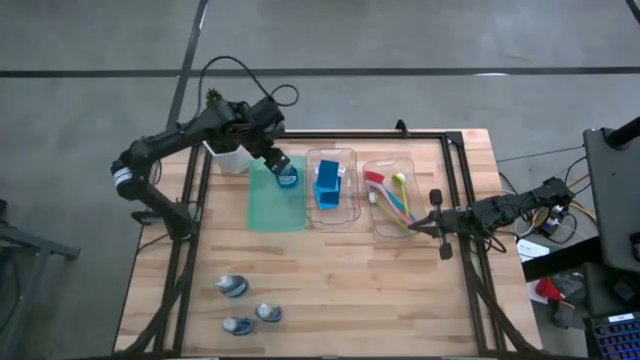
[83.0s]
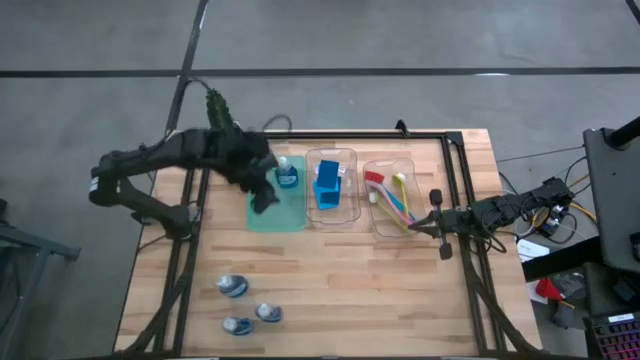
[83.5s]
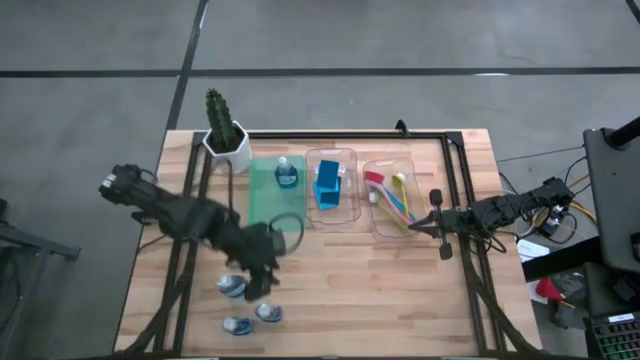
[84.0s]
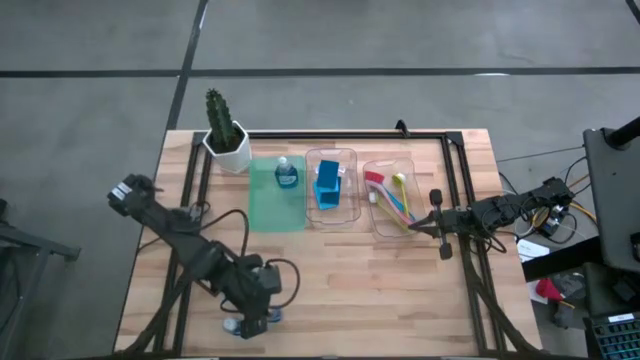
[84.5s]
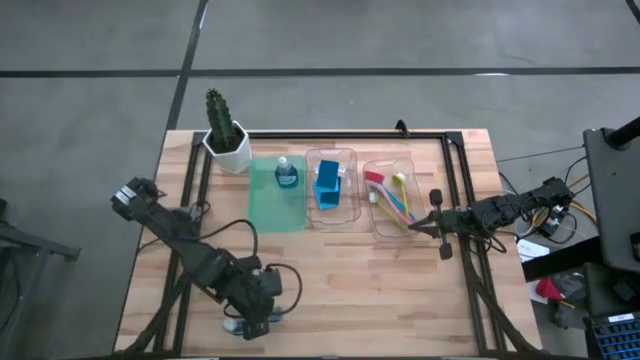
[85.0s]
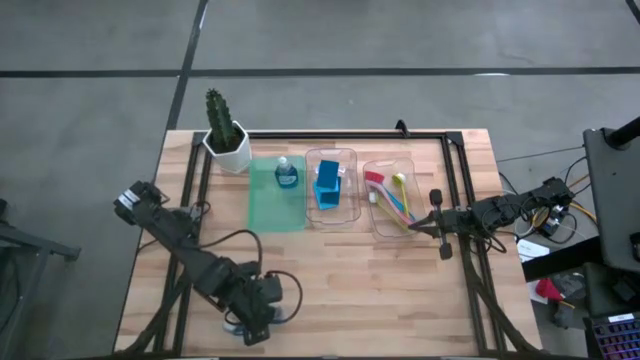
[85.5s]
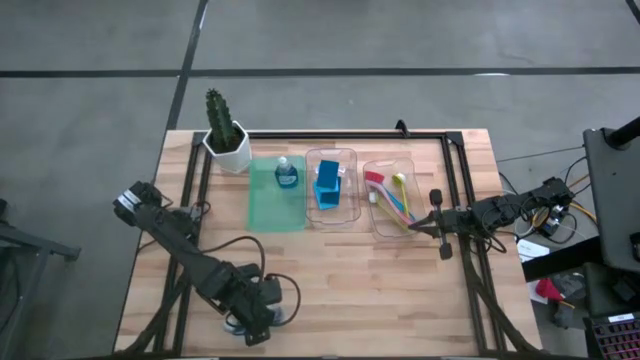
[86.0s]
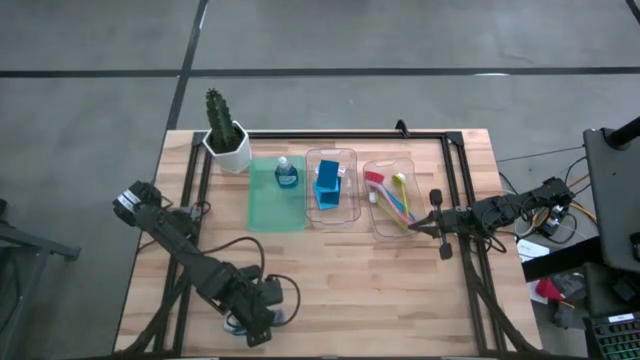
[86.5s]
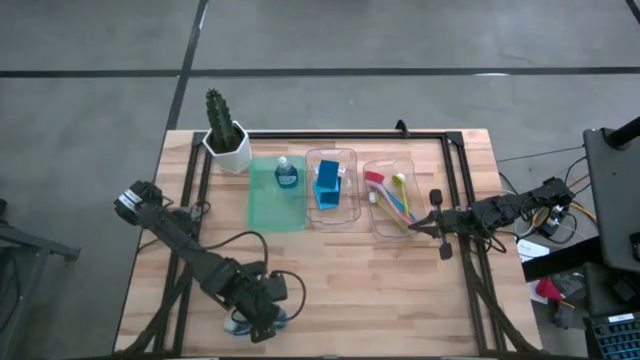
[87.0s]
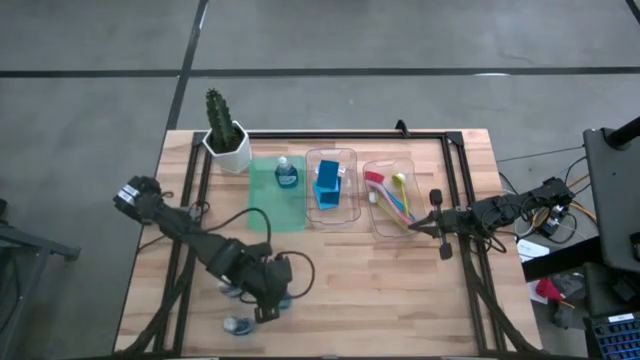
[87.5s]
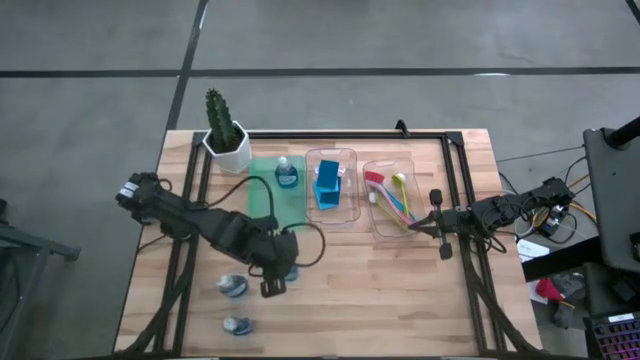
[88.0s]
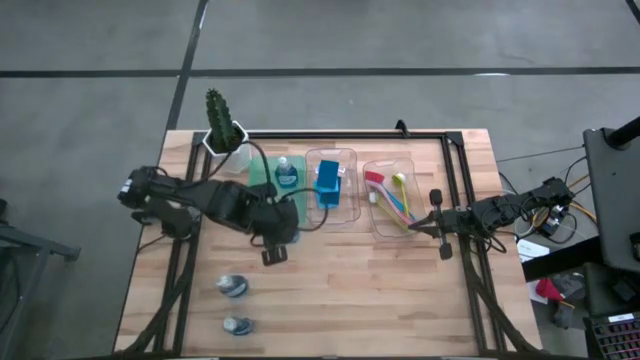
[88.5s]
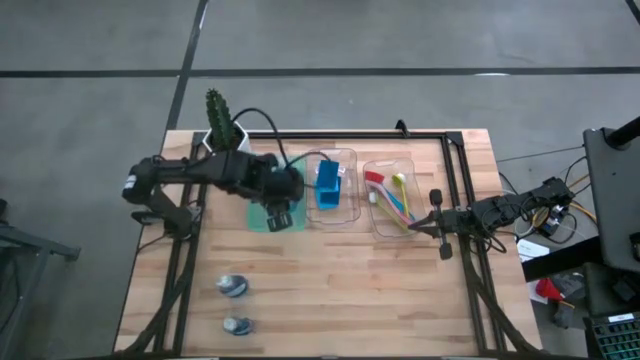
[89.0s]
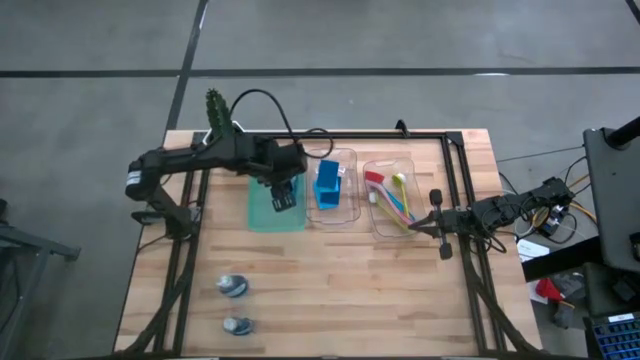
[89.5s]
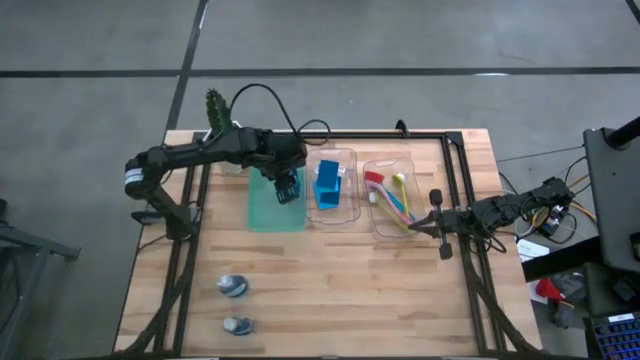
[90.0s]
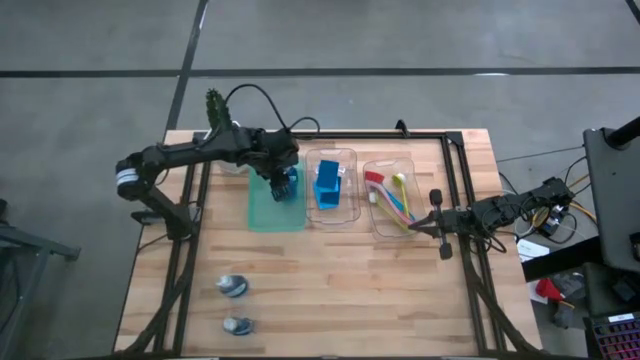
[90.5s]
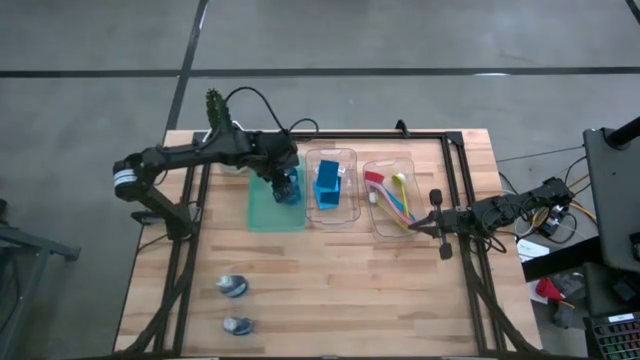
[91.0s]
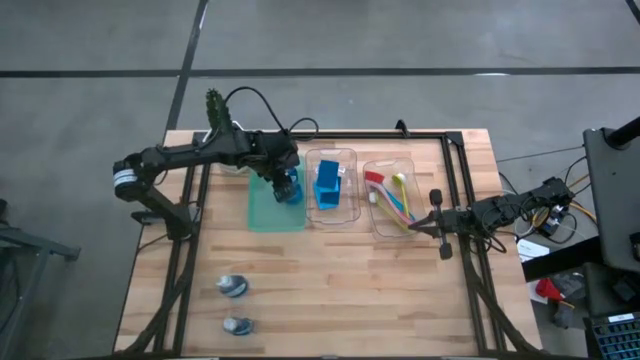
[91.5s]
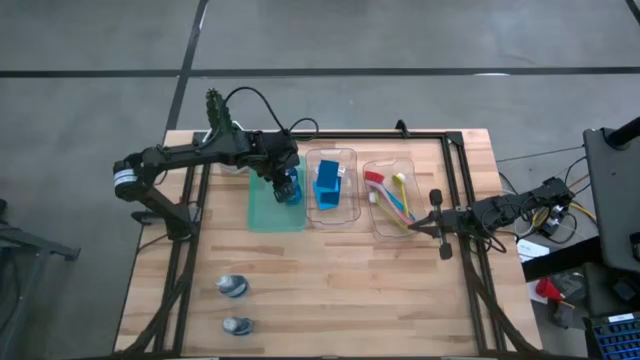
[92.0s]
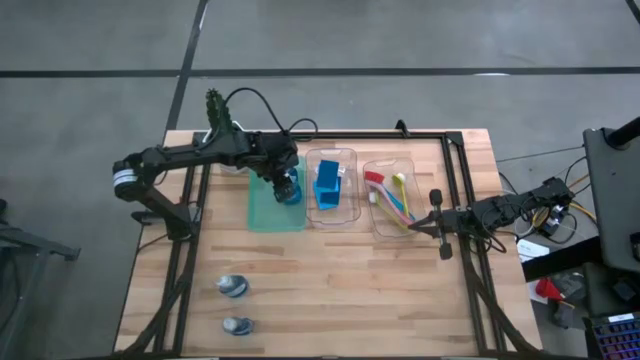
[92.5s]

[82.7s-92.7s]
Task: Pick & Place Kitchen Sink Supplies
Put the blue liquid soap into the green bin

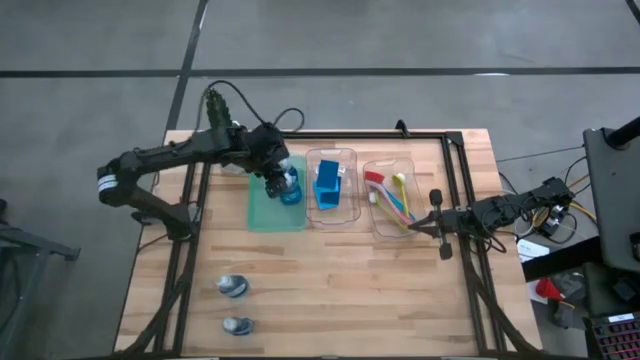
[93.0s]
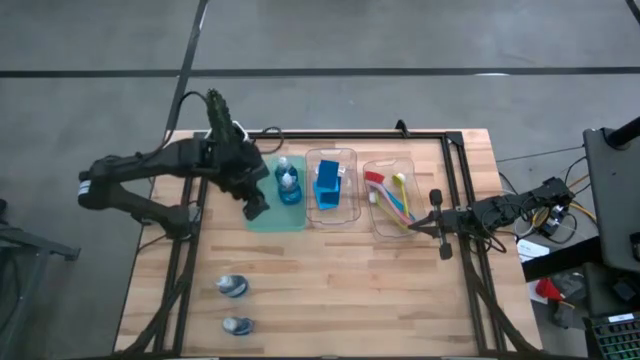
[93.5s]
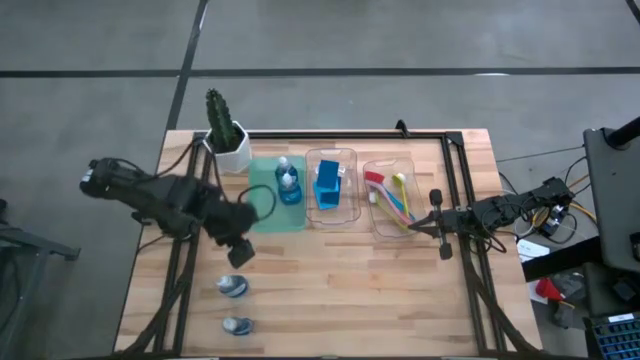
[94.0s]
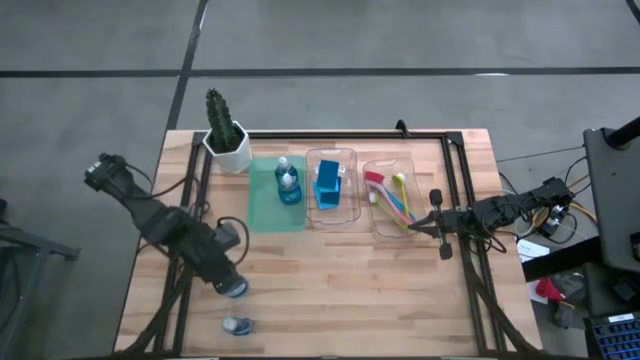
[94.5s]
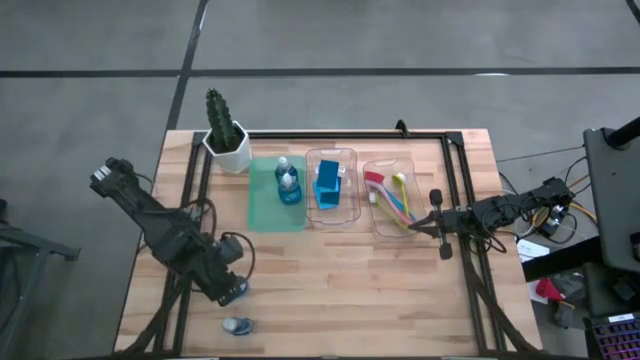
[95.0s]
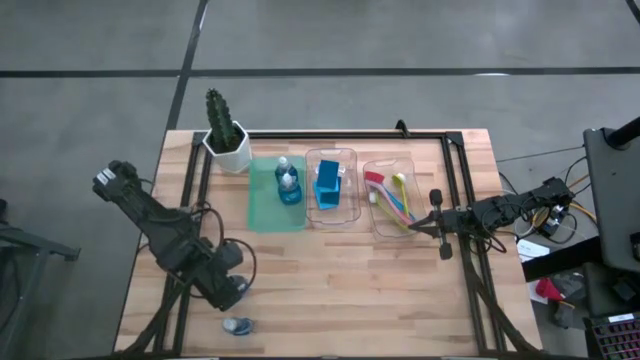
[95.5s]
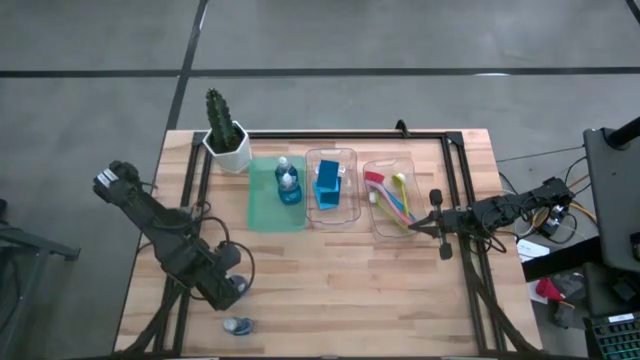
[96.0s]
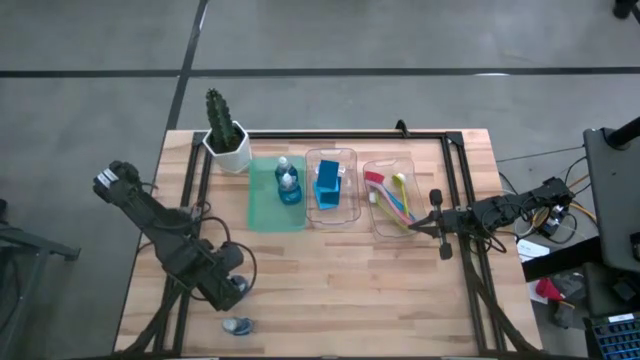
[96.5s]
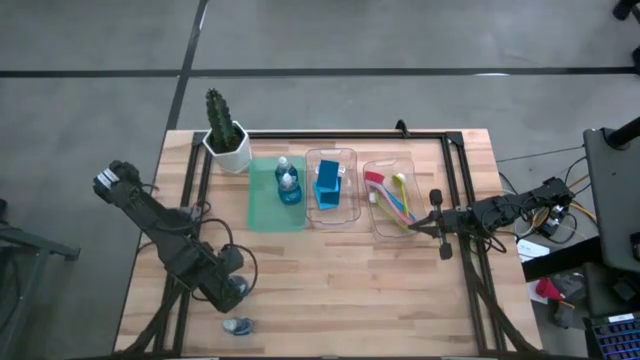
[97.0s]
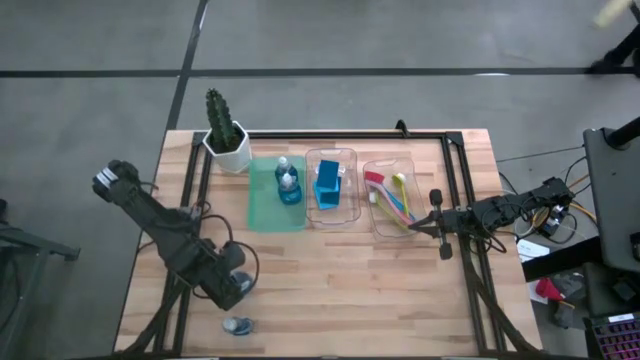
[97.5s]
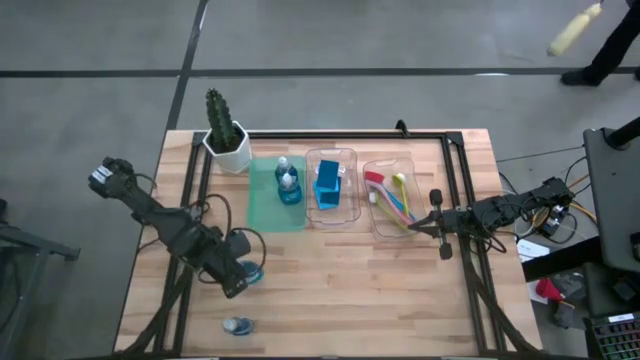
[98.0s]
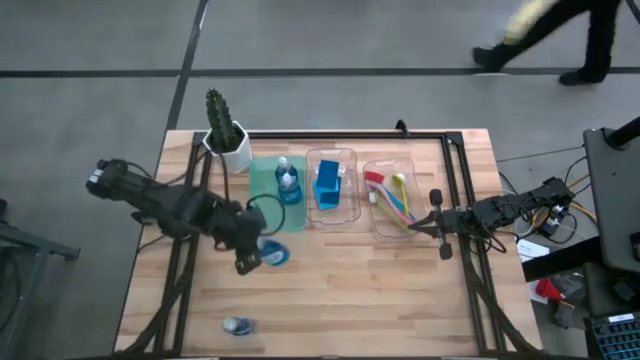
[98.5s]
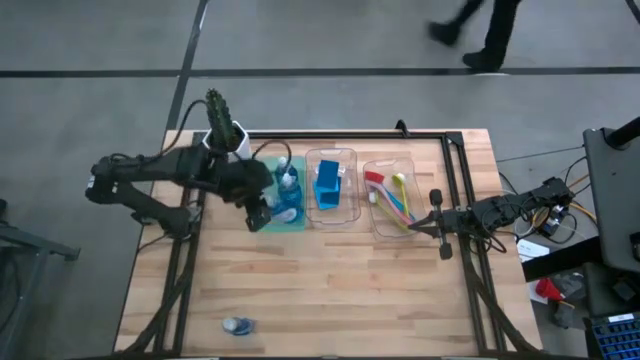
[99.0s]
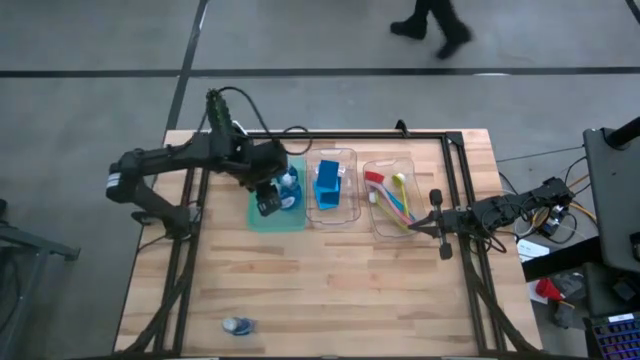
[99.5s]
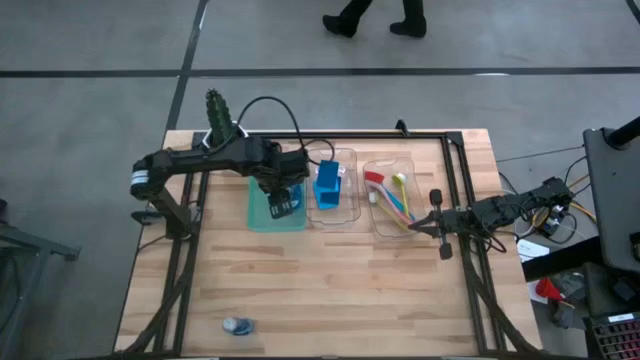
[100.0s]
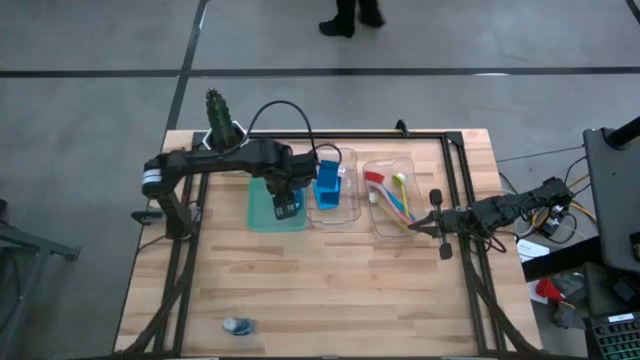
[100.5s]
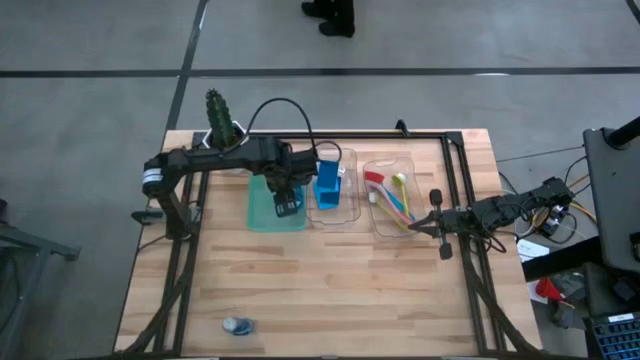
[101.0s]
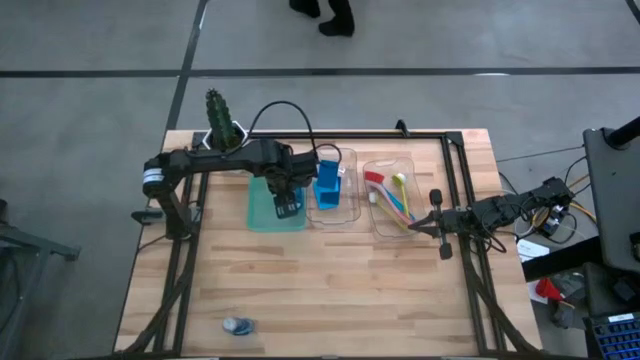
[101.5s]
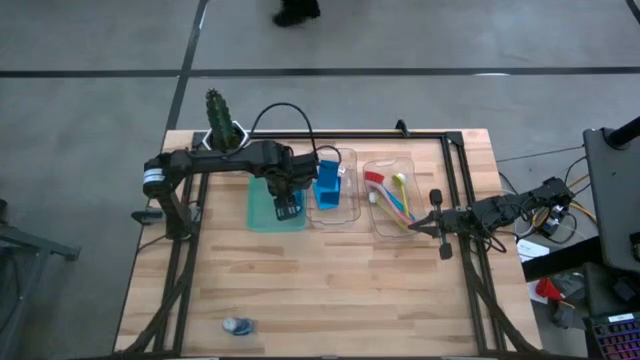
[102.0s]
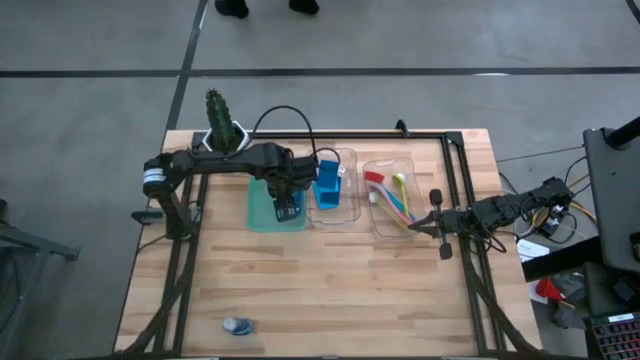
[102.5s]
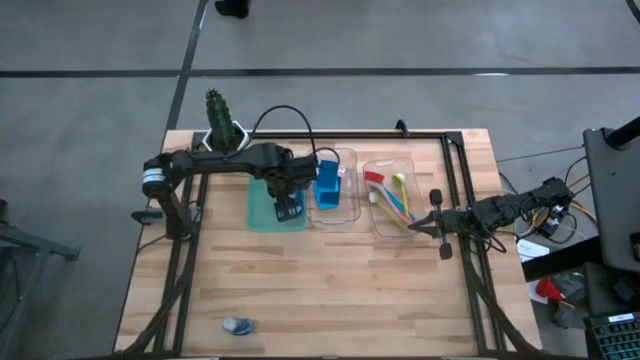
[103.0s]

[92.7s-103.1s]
Put the blue liquid soap into the green bin
